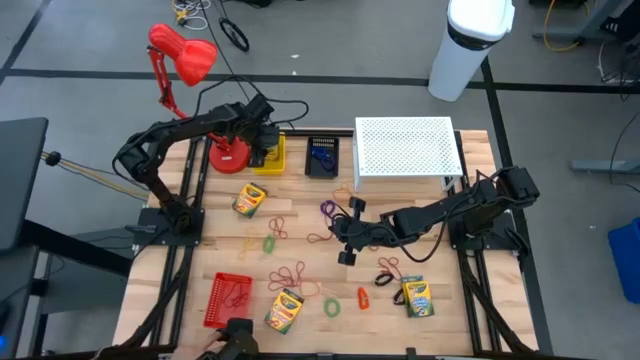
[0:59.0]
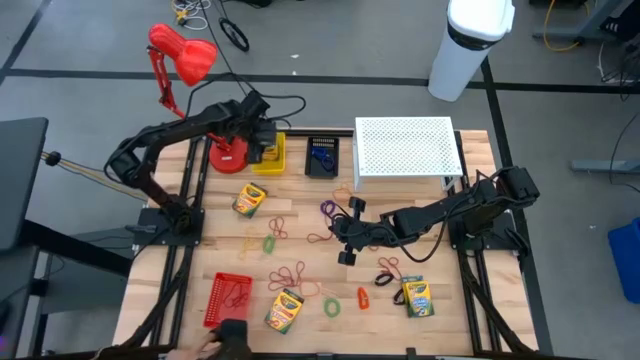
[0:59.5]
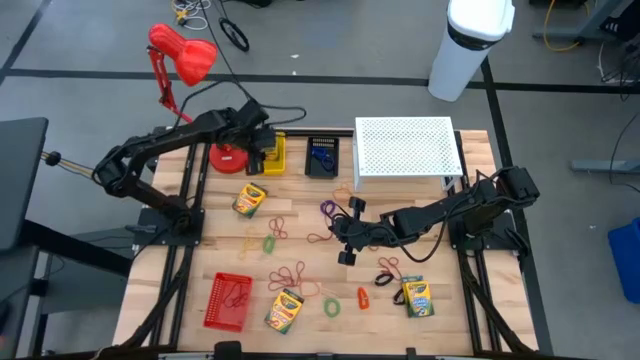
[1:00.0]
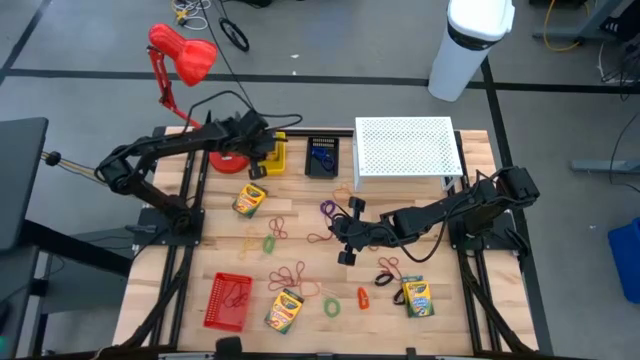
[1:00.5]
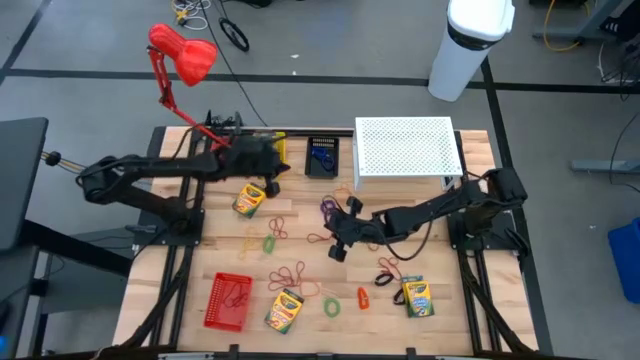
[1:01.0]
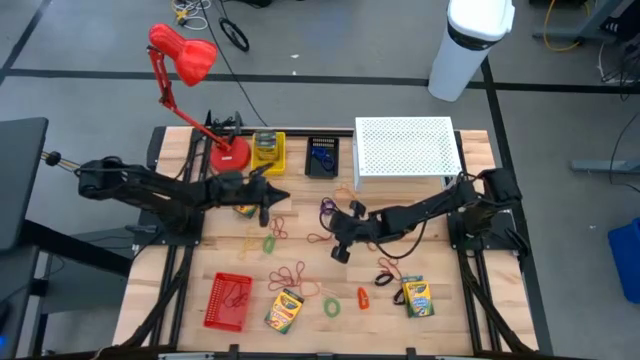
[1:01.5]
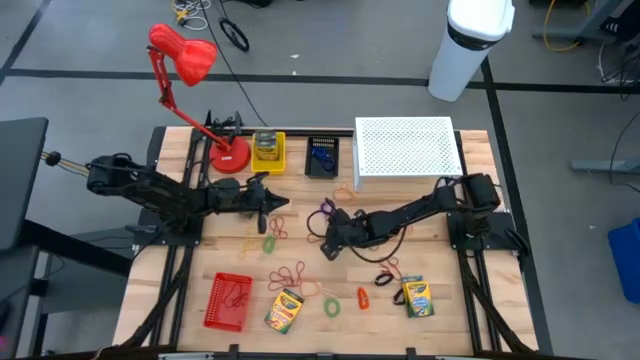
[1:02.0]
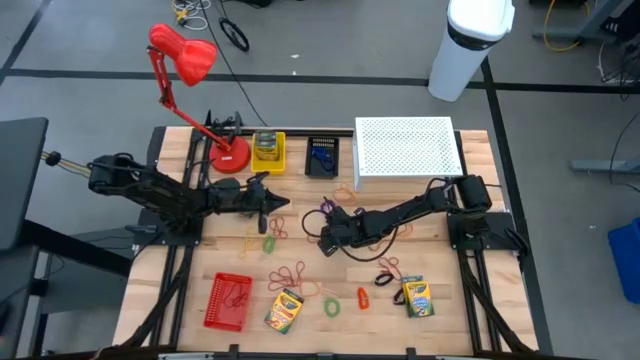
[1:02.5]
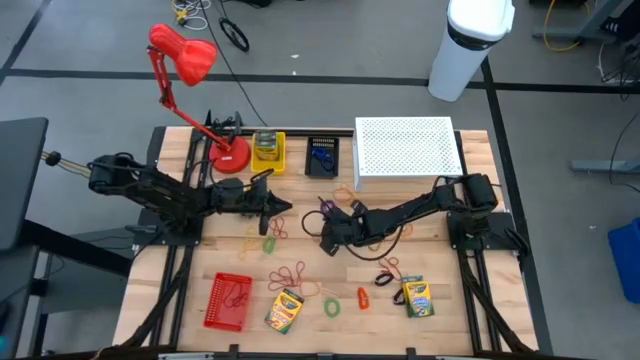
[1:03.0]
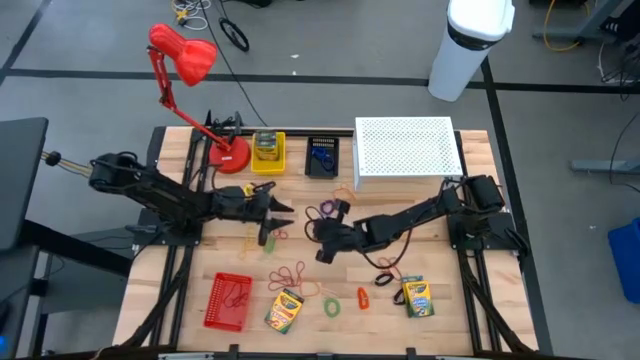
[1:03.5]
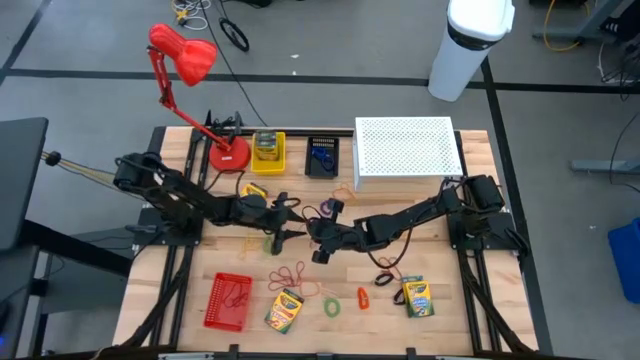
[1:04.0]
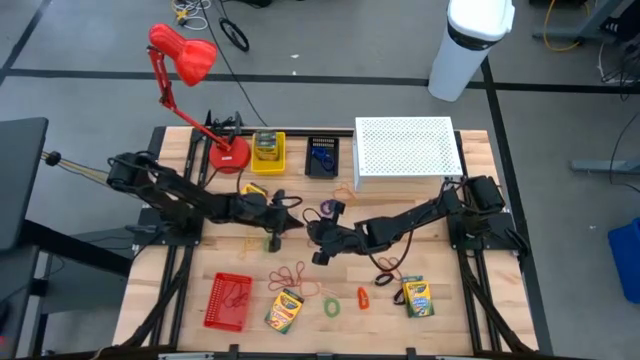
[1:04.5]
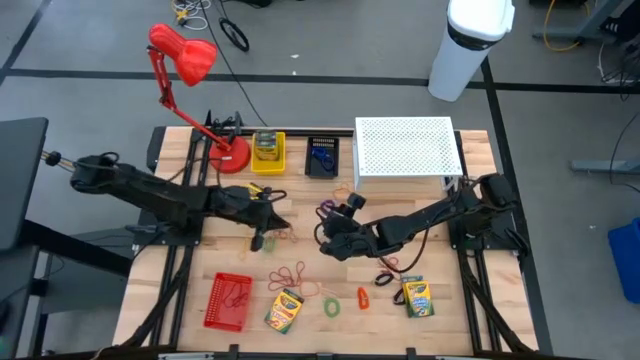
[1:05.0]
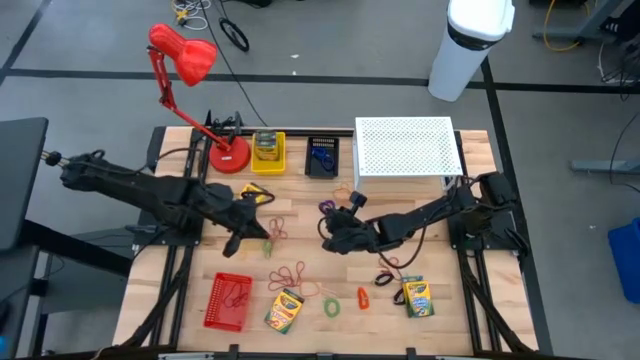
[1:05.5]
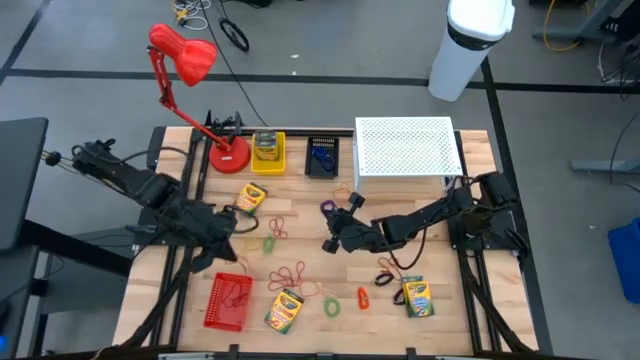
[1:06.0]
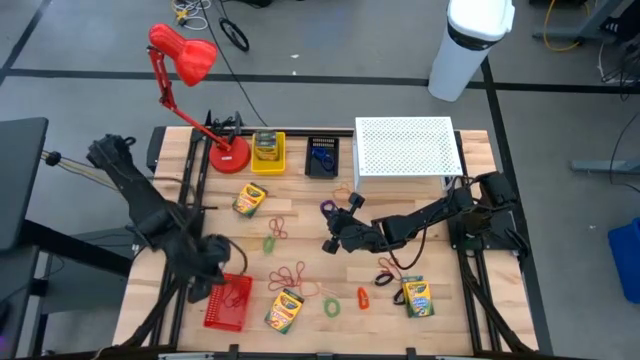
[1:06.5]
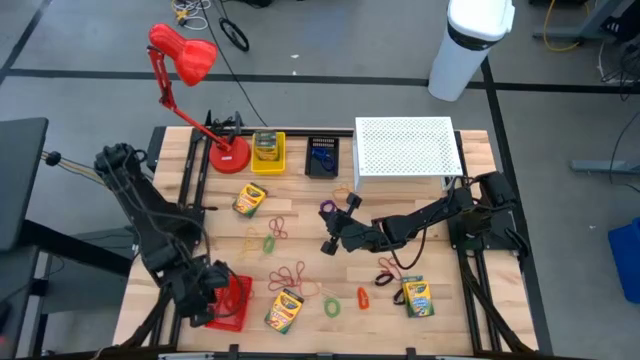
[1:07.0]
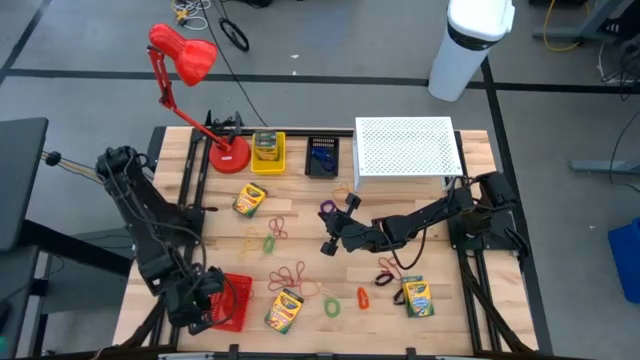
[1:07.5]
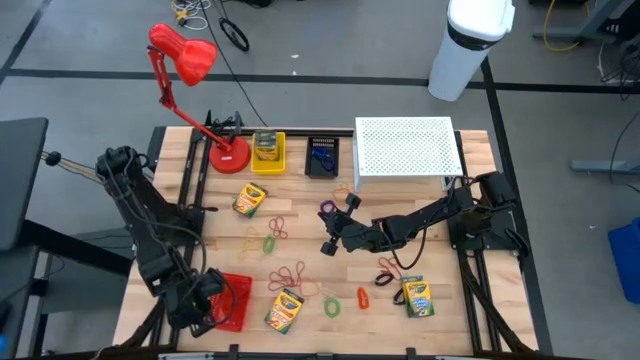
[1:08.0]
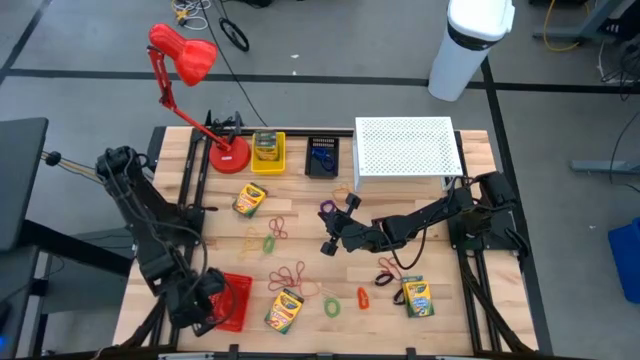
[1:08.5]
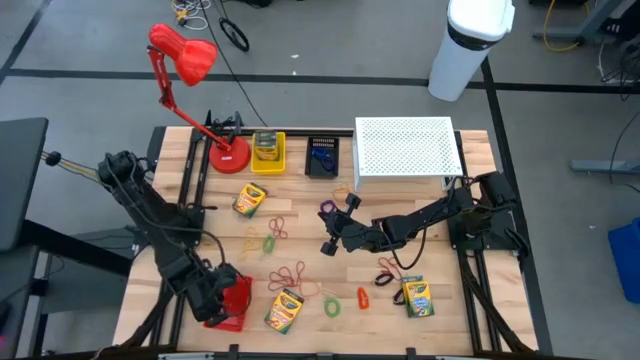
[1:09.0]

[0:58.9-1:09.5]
Task: Pick & Place Office Desk Supplies
Put the red rubber band into the red bin

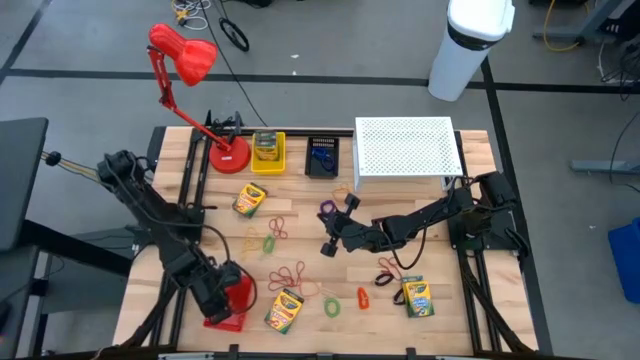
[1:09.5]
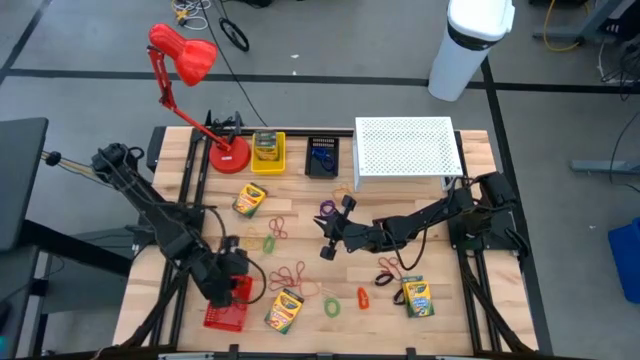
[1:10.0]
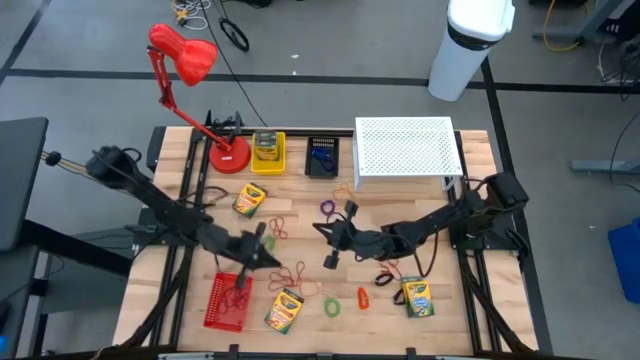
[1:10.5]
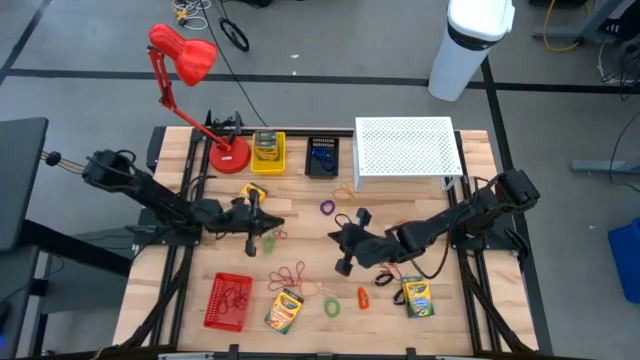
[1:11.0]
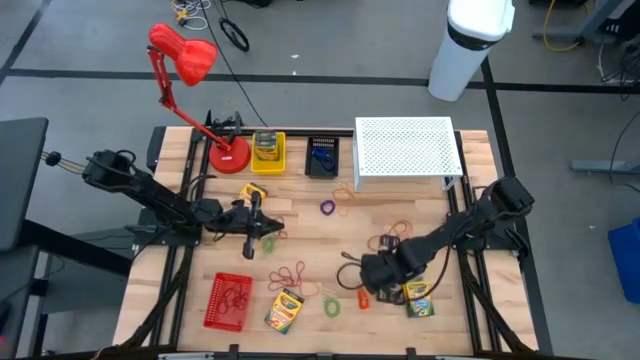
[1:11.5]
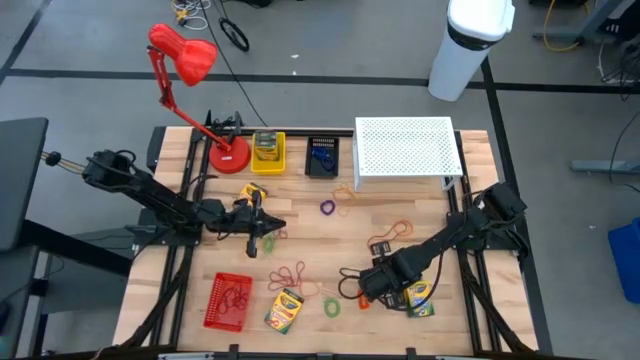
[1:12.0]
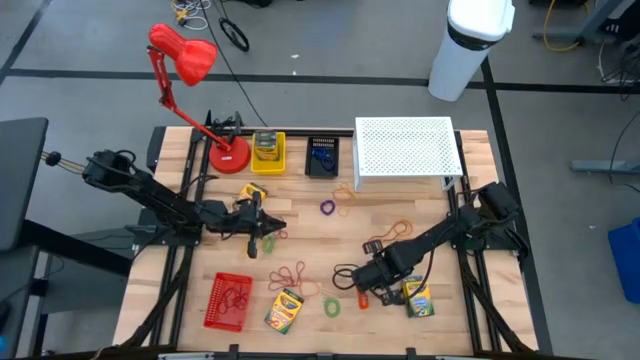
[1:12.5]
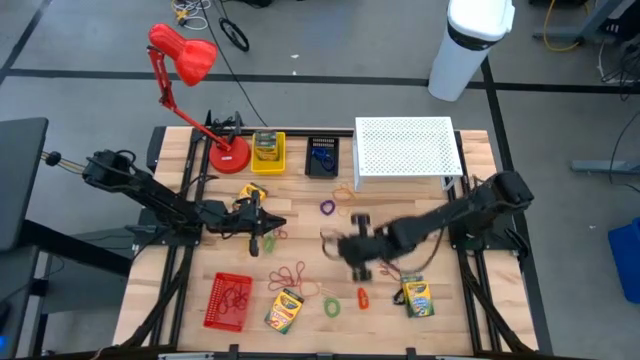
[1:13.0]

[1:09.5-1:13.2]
Put the black spiral keychain into the black bin

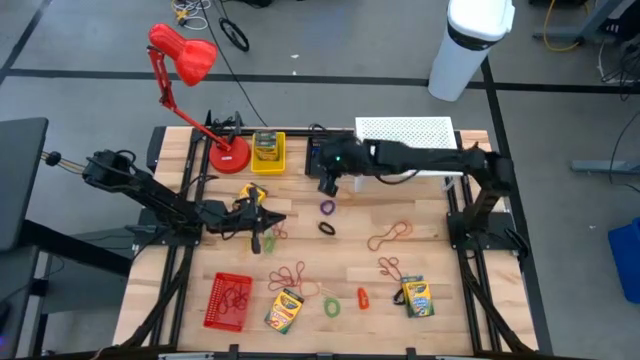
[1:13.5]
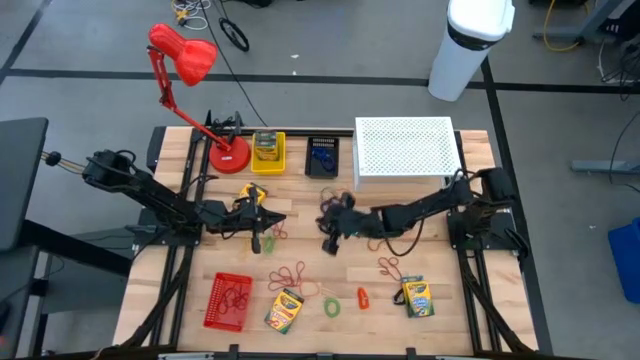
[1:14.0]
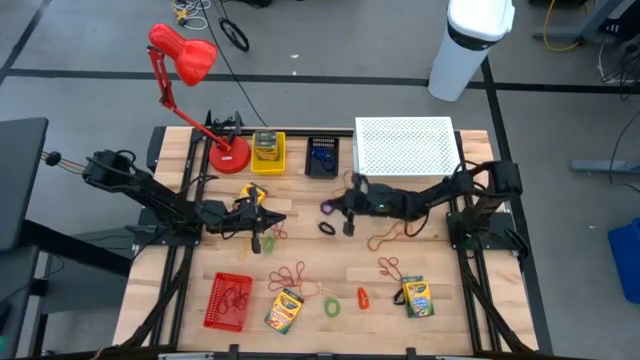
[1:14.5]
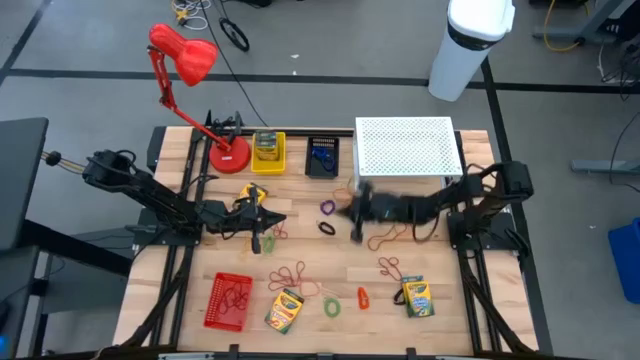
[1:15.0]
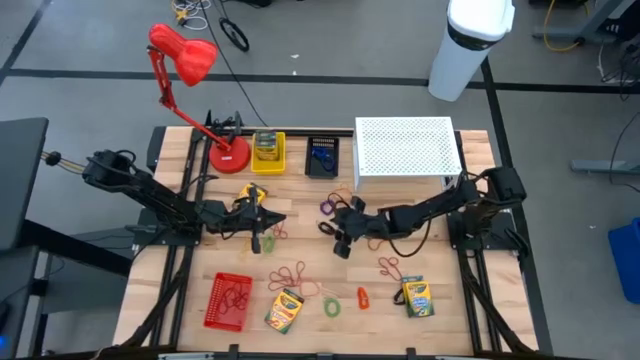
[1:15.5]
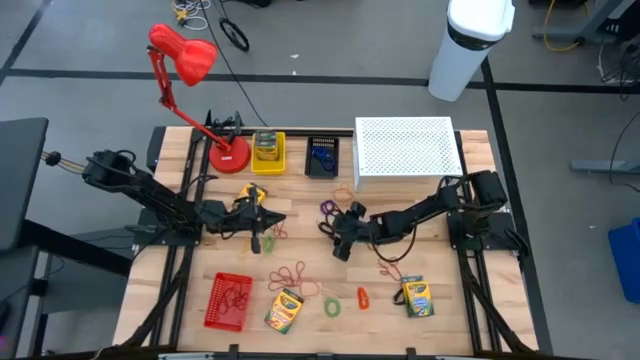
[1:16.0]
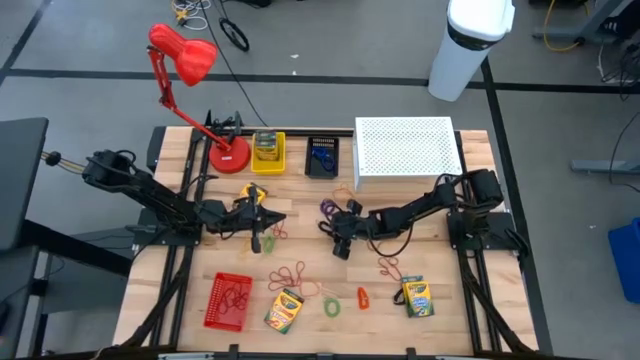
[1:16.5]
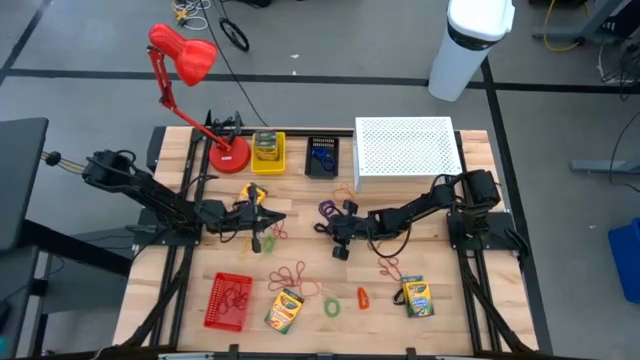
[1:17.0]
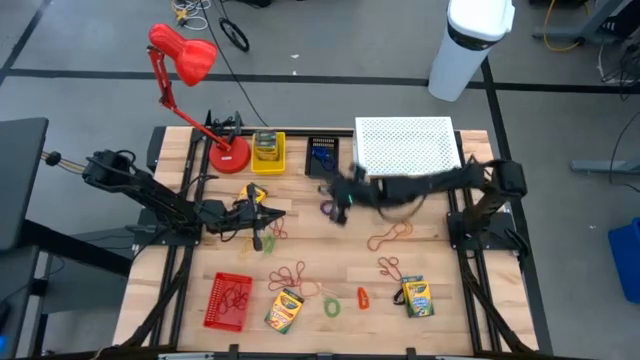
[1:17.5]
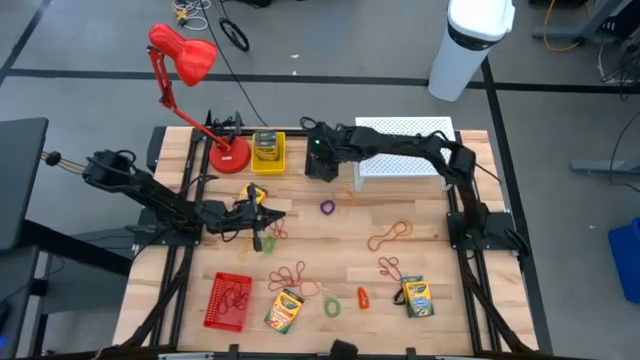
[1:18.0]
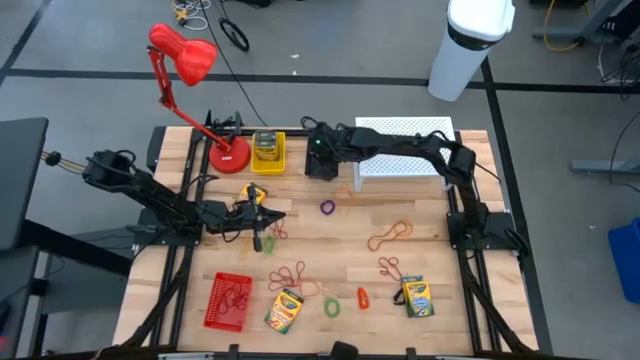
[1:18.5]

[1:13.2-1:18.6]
Put the black spiral keychain into the black bin
